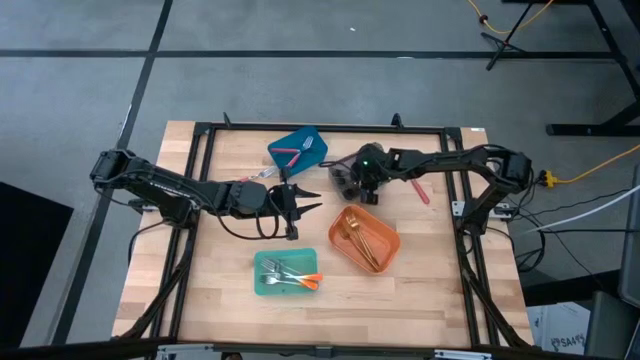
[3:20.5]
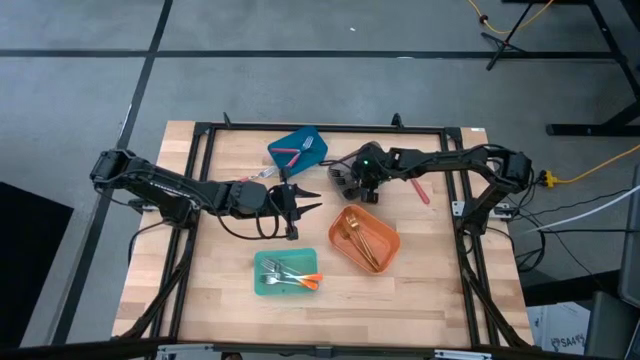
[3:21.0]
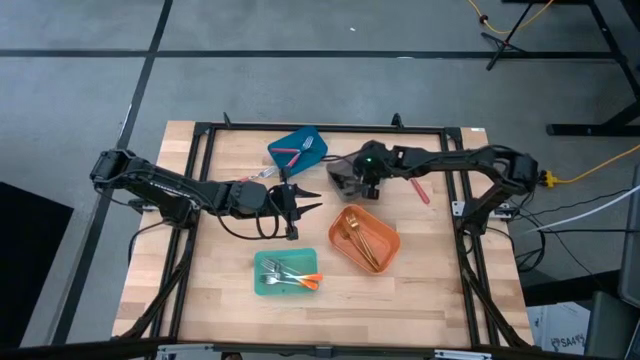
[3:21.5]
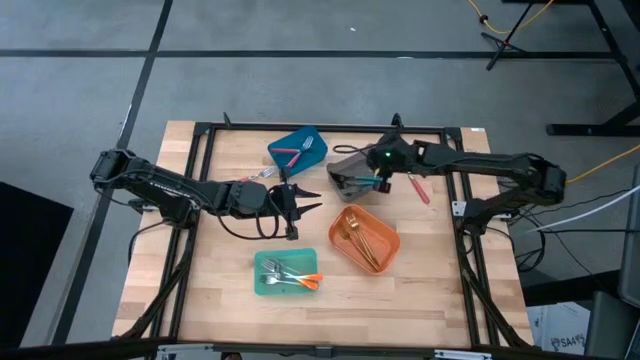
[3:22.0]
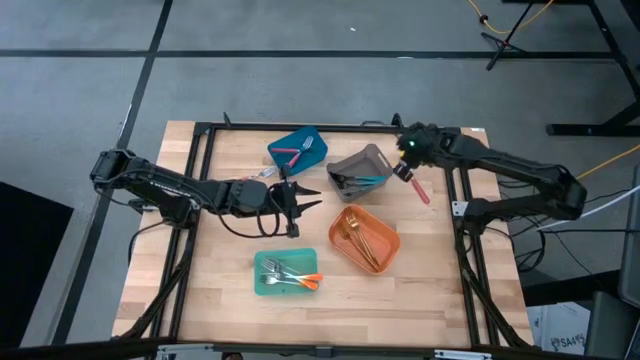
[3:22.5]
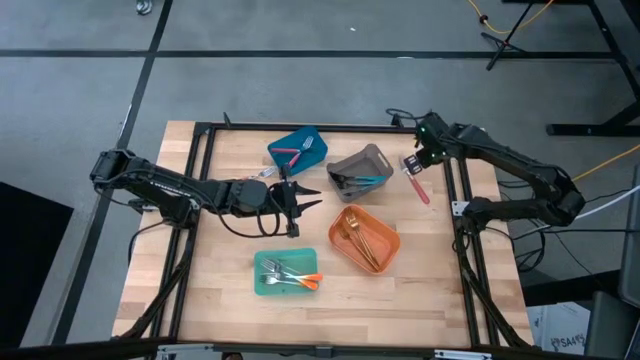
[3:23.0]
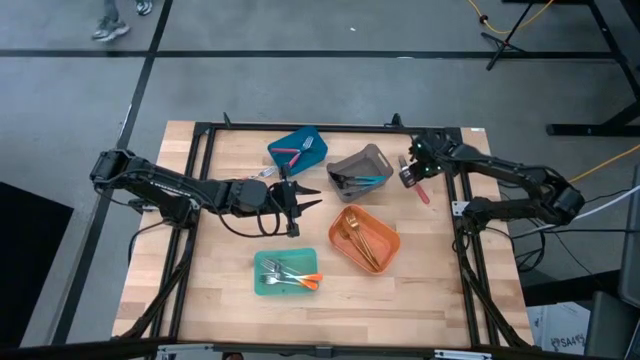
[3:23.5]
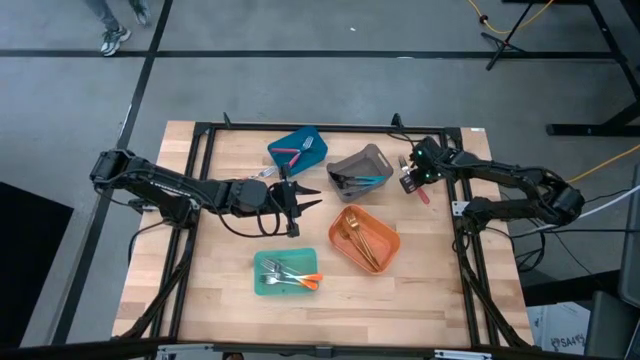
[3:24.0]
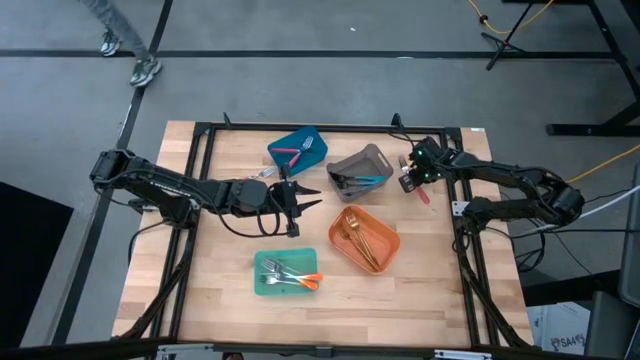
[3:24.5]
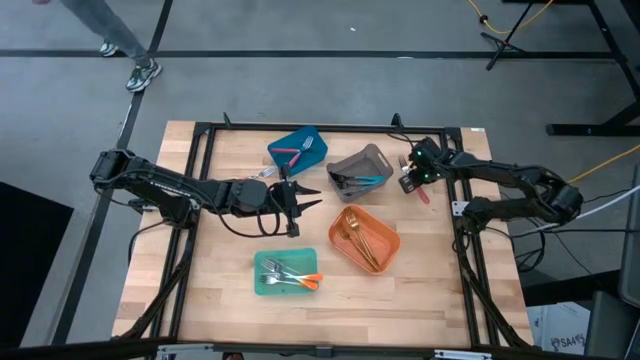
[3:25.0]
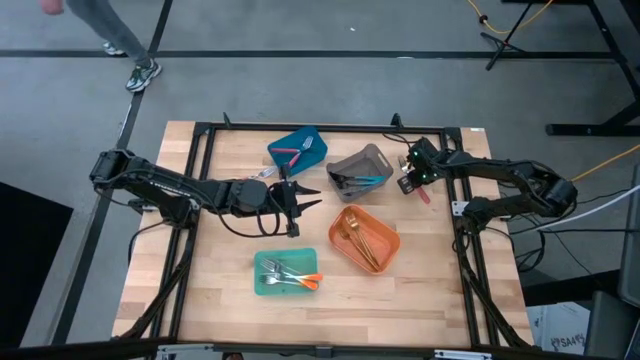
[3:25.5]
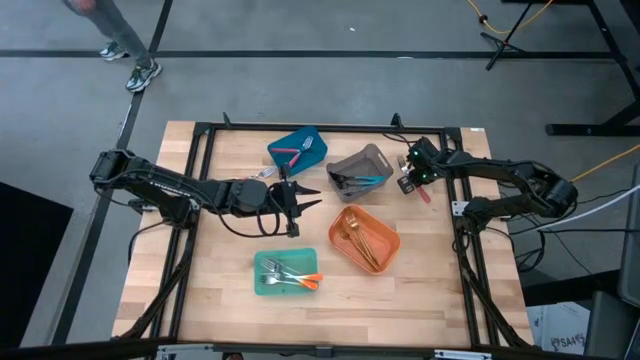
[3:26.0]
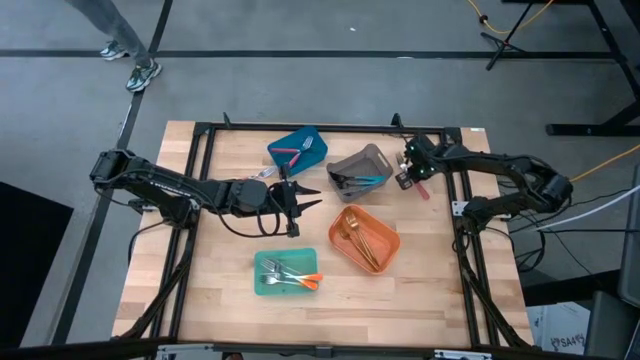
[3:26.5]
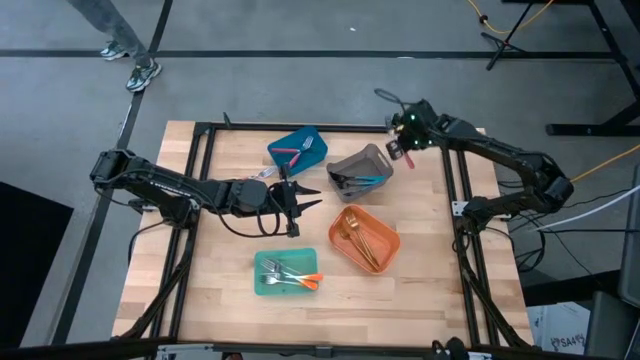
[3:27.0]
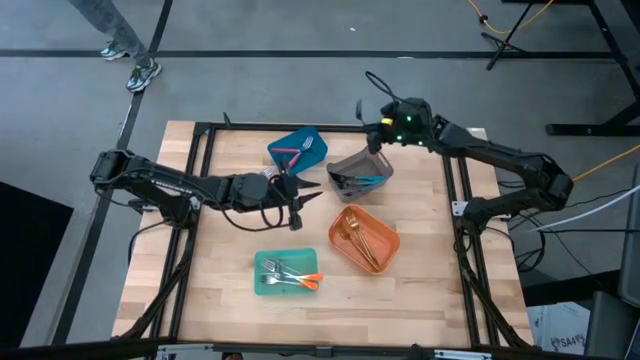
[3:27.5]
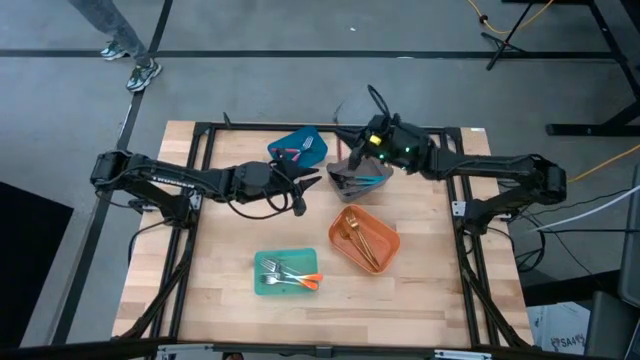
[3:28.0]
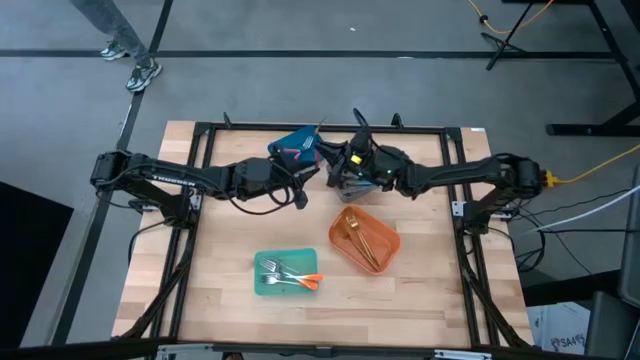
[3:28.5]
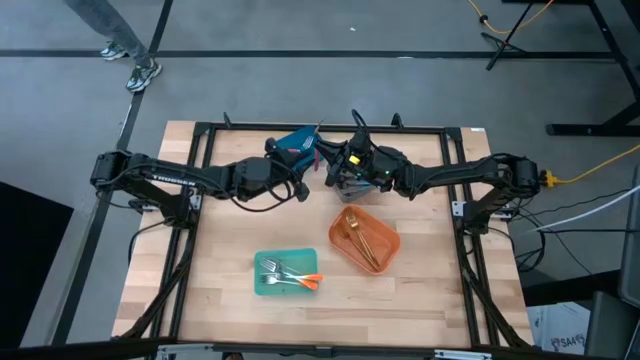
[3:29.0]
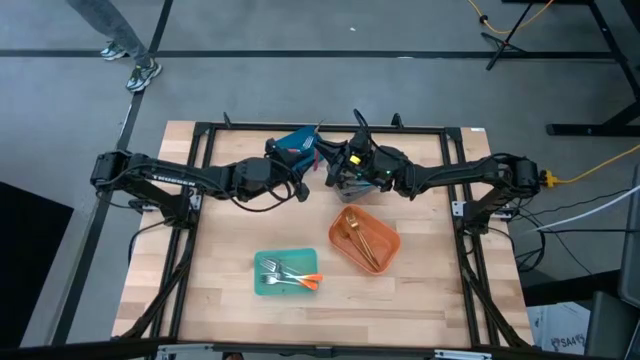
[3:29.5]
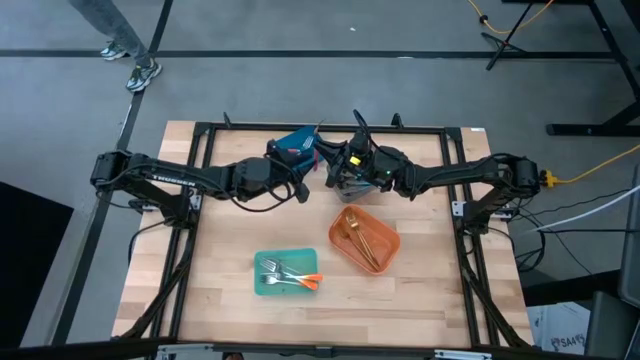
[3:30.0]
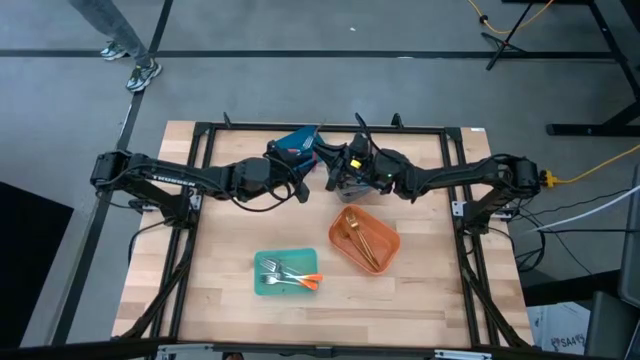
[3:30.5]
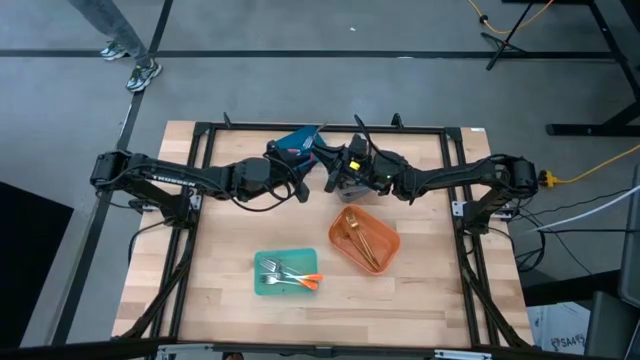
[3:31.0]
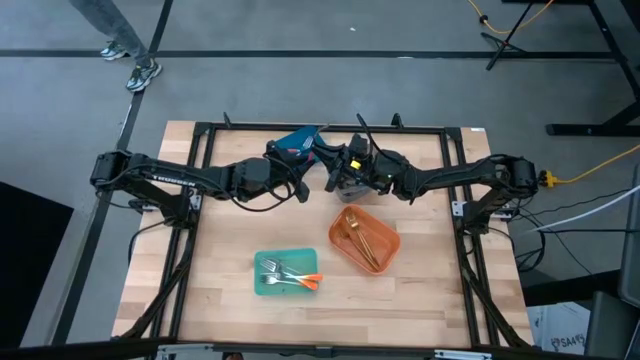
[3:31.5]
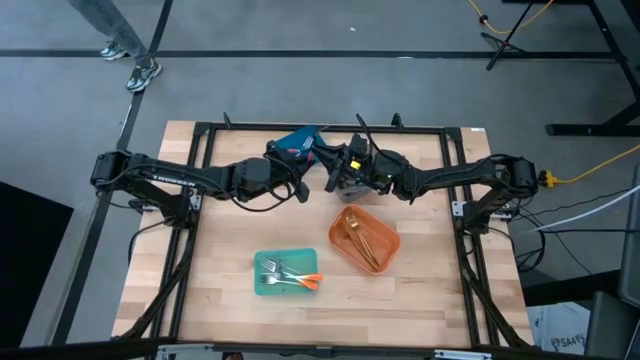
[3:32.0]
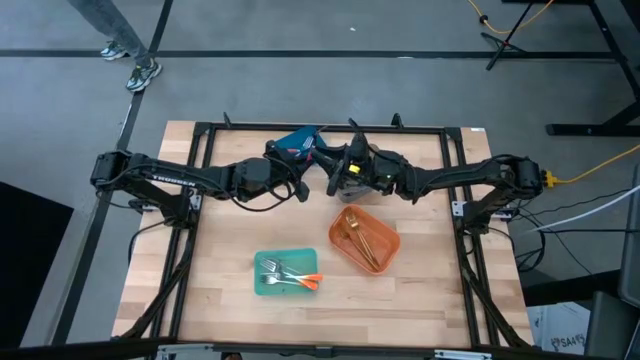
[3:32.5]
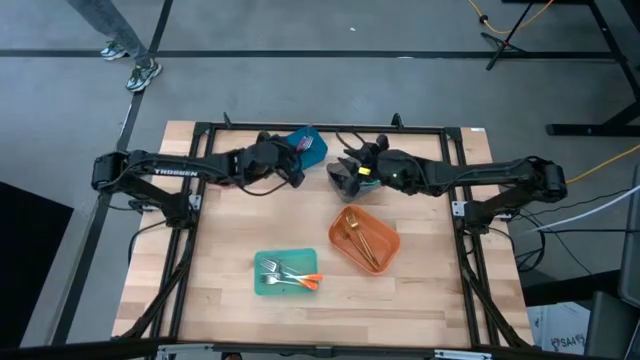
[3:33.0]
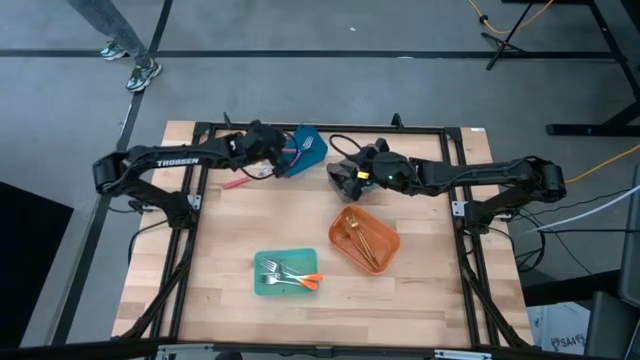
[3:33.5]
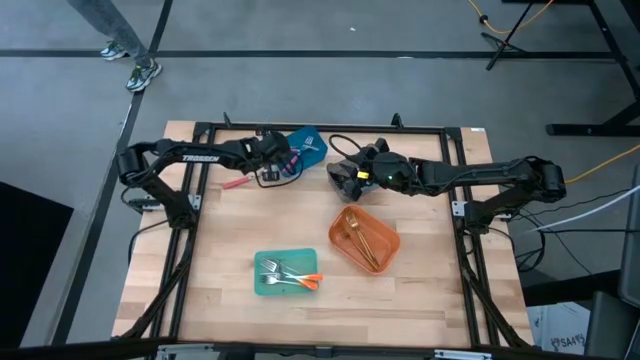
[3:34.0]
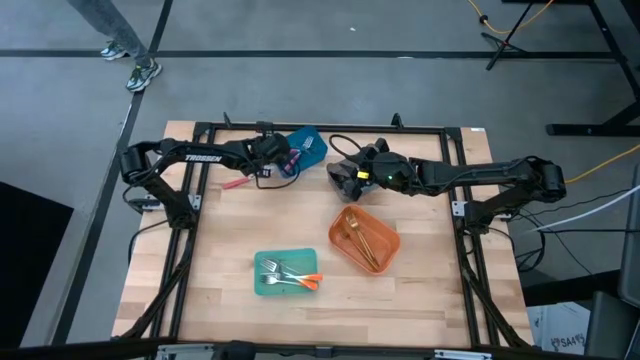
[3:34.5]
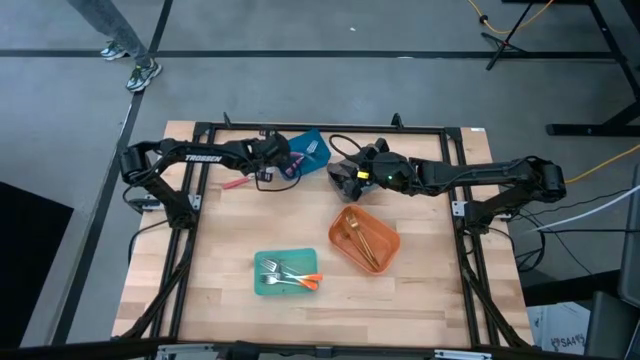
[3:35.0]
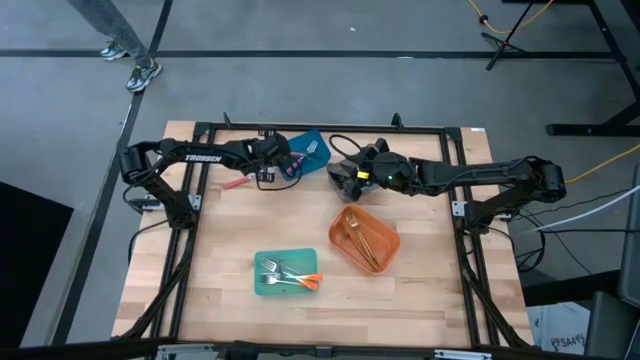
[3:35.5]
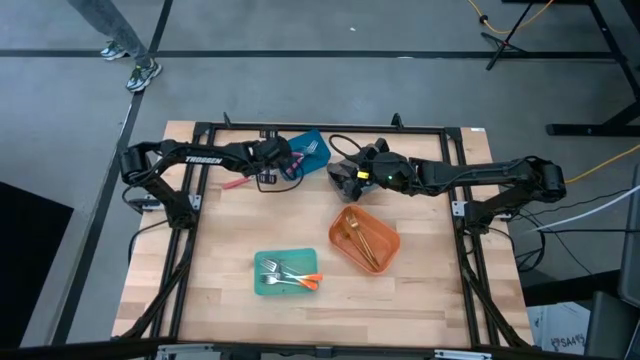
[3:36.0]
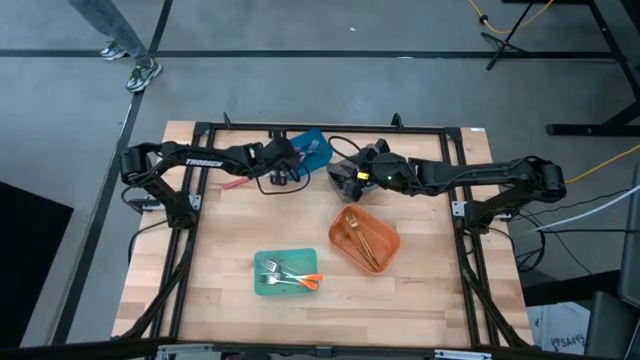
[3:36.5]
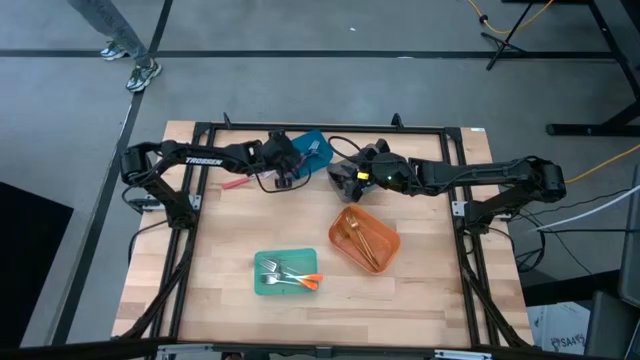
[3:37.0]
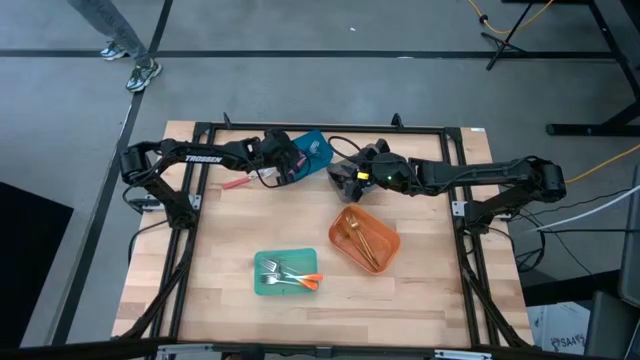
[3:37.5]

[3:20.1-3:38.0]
Task: Sort silverware by color (type)
Put the pink fork into the top left blue bin

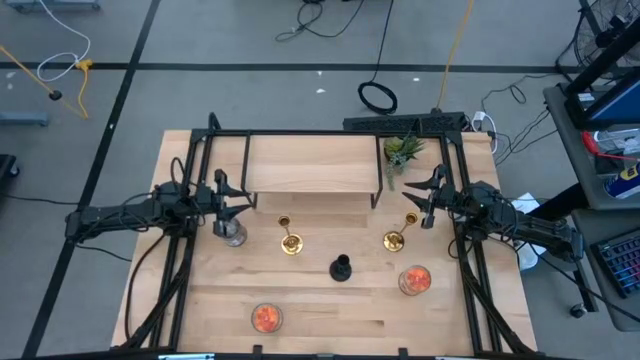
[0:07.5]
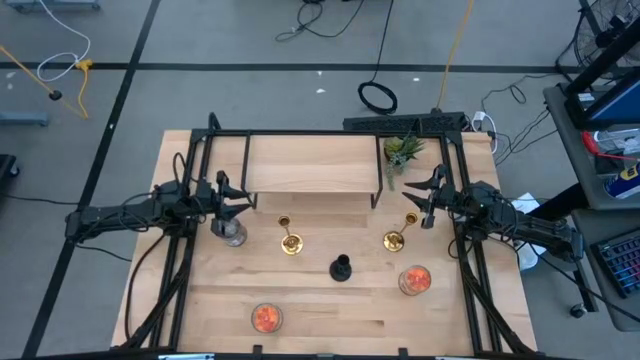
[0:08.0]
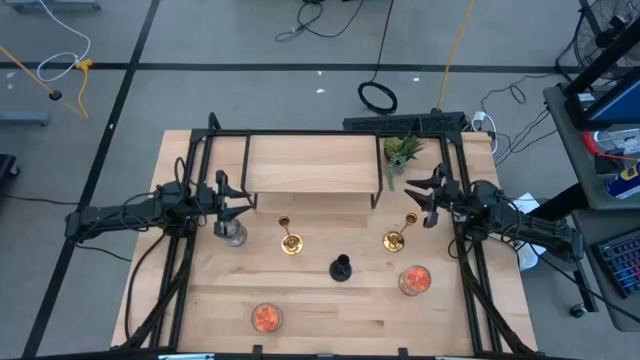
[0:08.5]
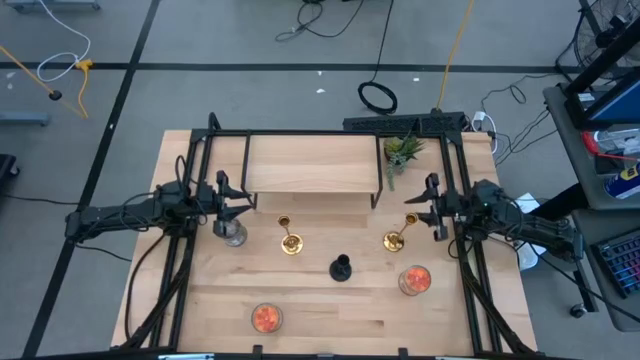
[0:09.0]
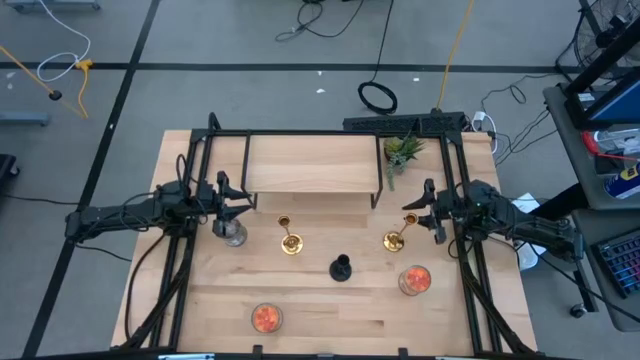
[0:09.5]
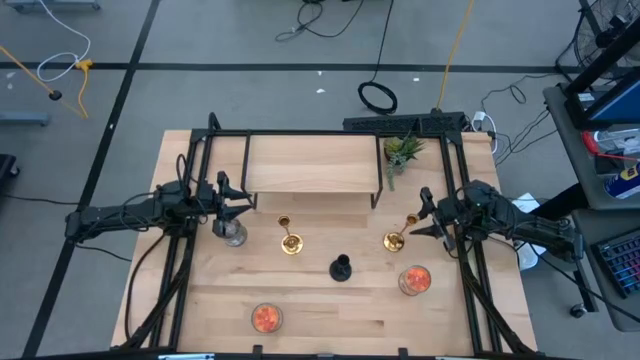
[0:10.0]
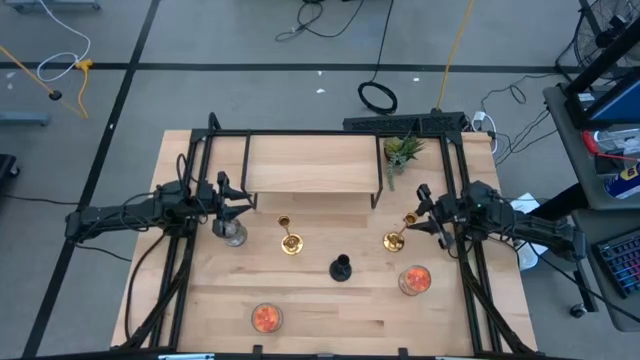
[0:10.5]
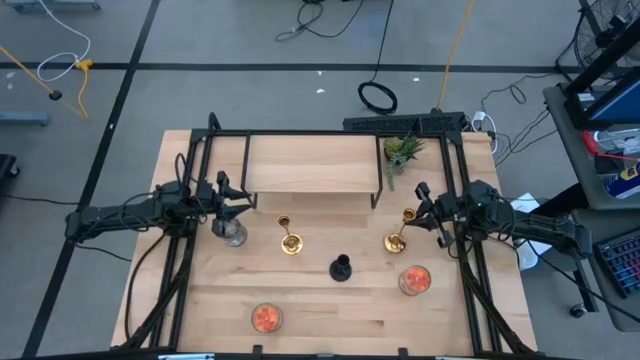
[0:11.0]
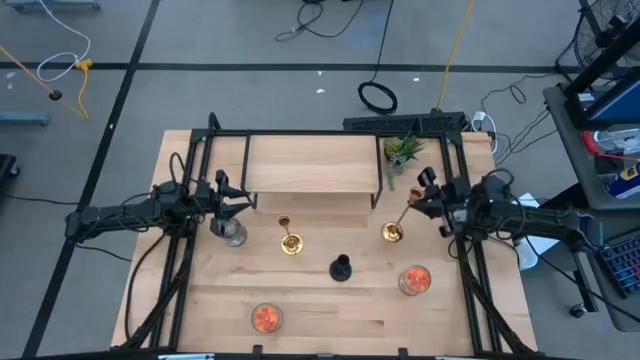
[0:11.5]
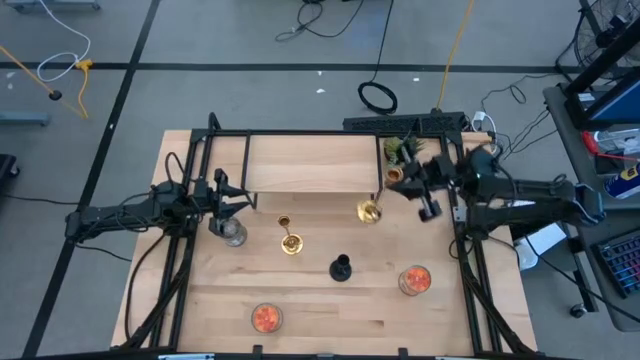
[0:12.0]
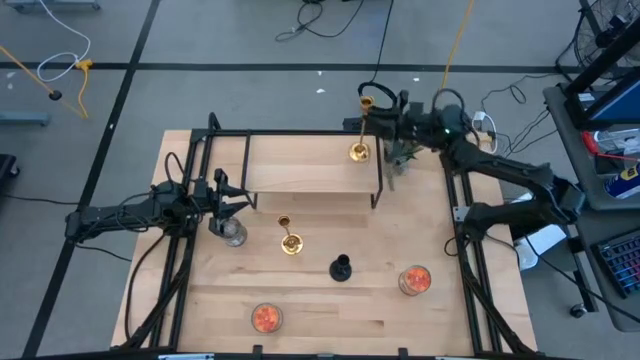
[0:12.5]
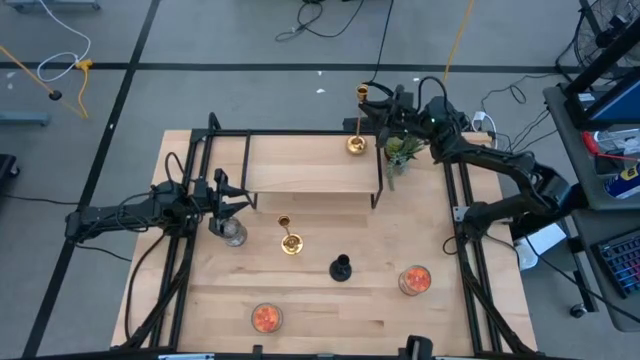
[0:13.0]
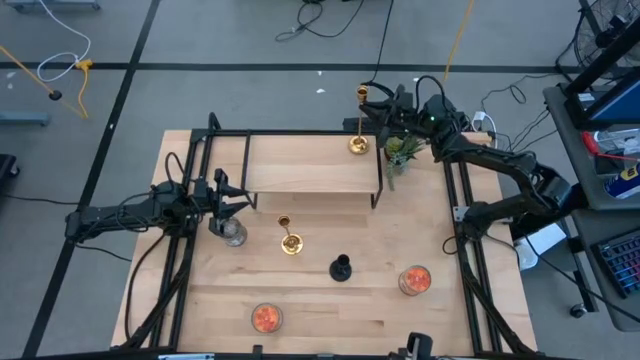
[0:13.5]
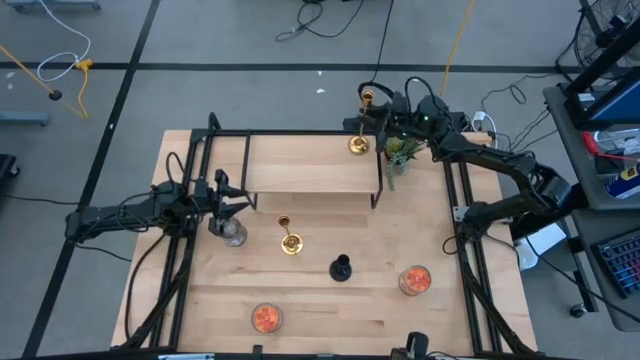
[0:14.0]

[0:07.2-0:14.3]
Task: Pick & Place candle stick holders
Put the right gold candle holder on the shelf
